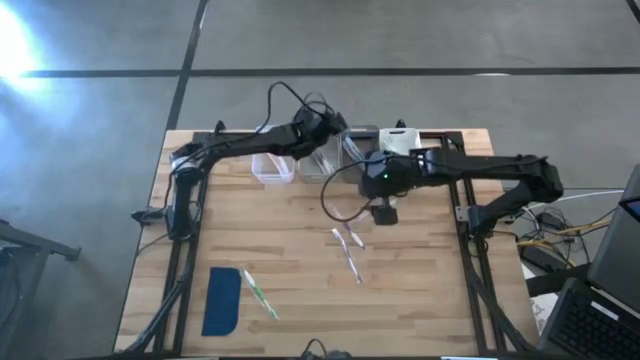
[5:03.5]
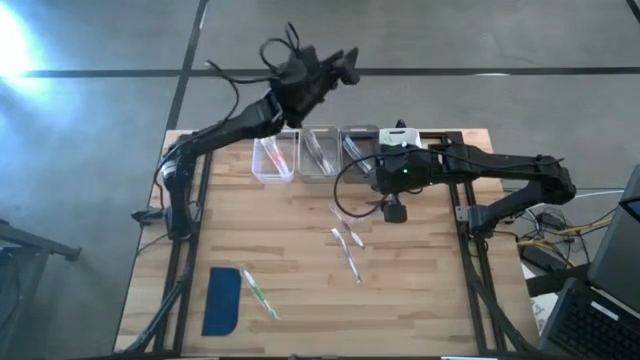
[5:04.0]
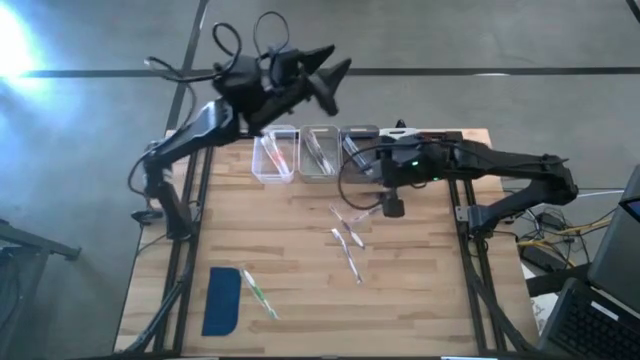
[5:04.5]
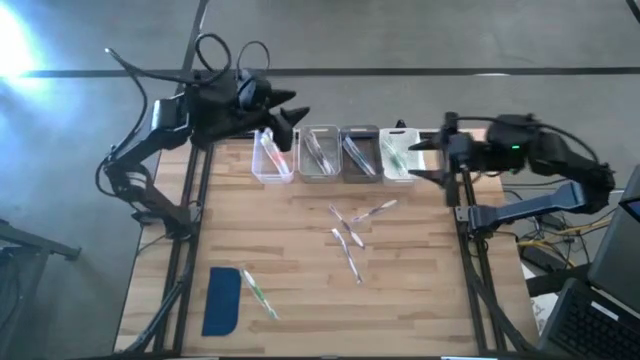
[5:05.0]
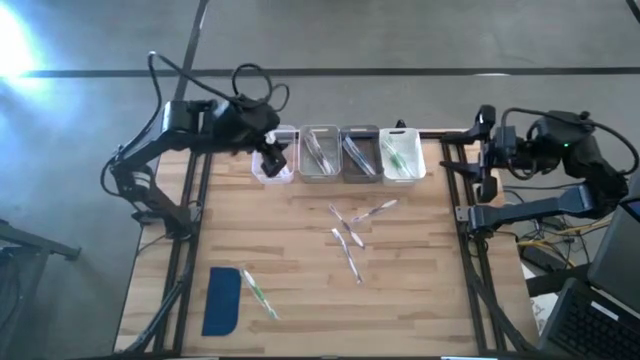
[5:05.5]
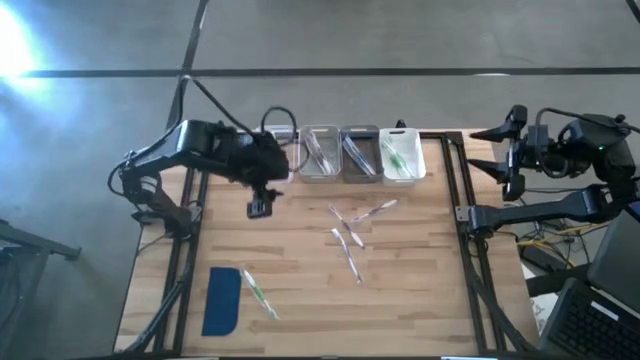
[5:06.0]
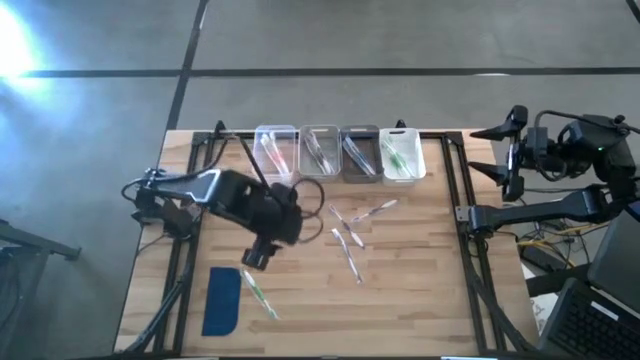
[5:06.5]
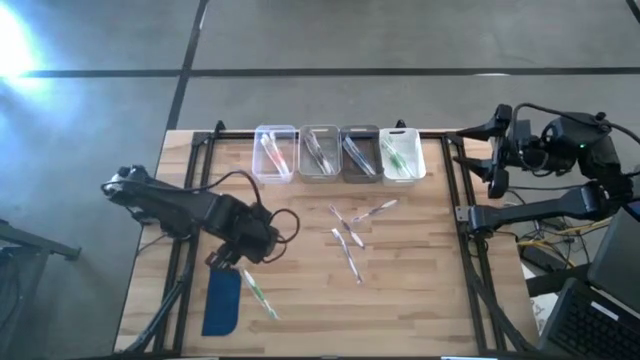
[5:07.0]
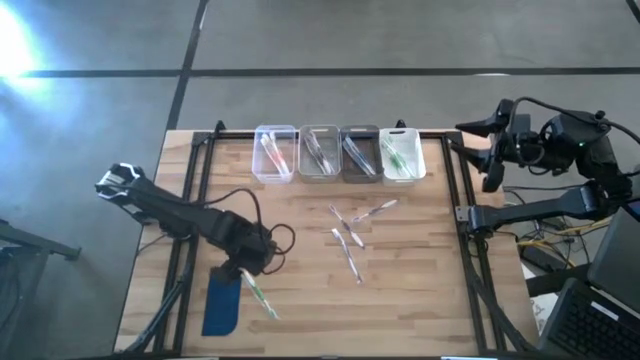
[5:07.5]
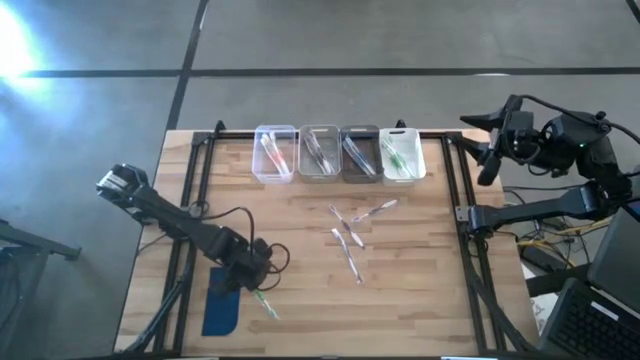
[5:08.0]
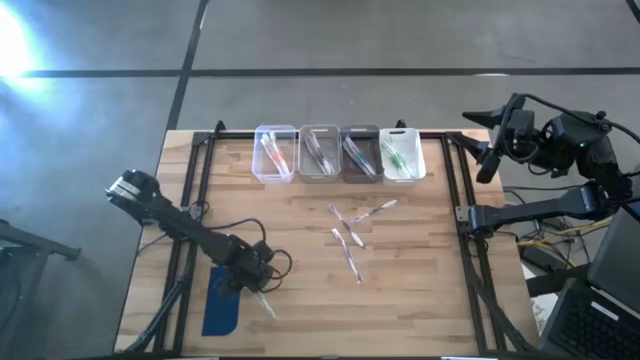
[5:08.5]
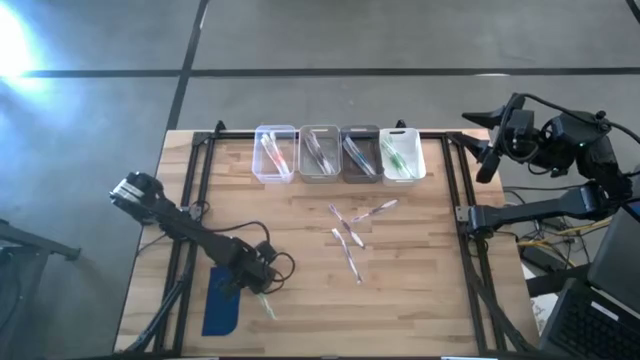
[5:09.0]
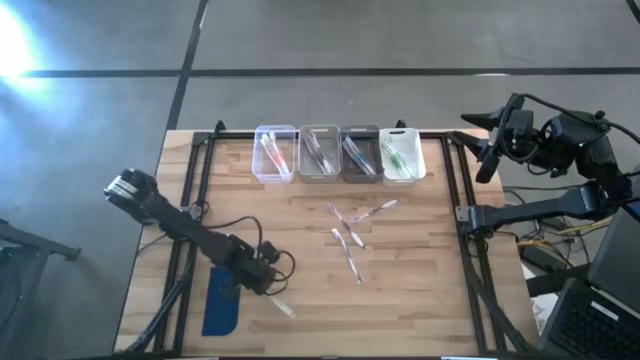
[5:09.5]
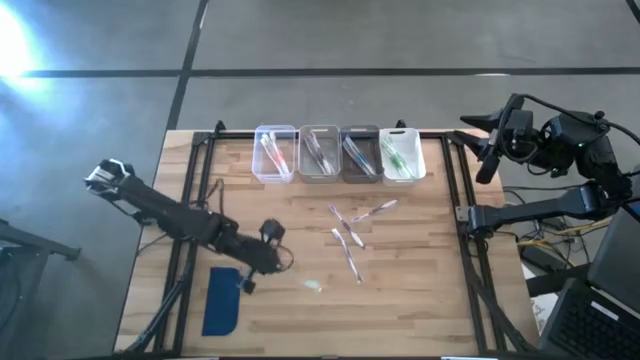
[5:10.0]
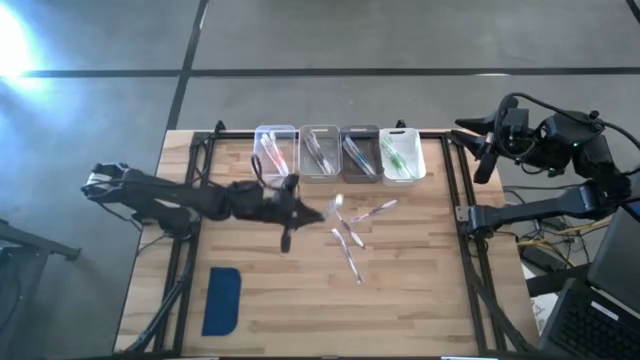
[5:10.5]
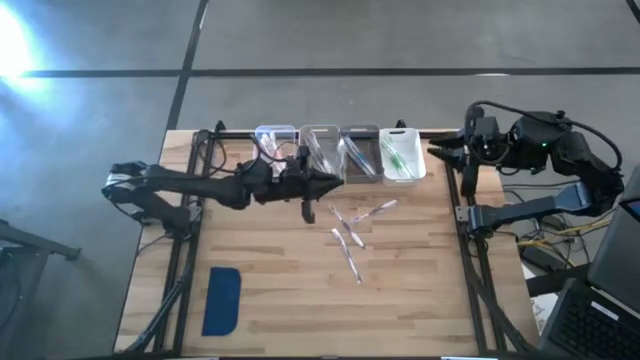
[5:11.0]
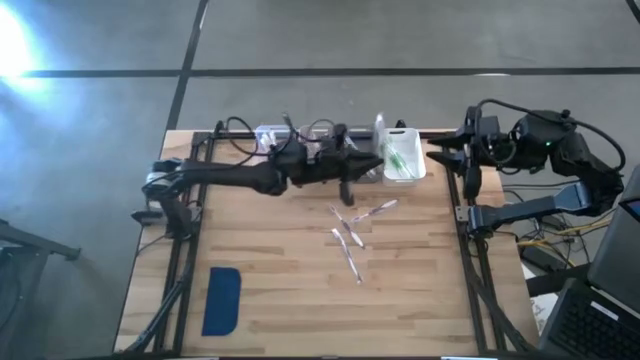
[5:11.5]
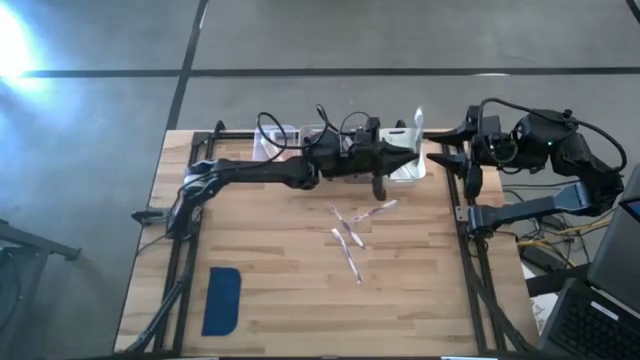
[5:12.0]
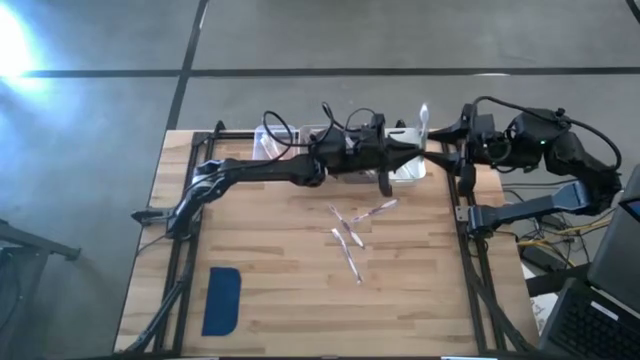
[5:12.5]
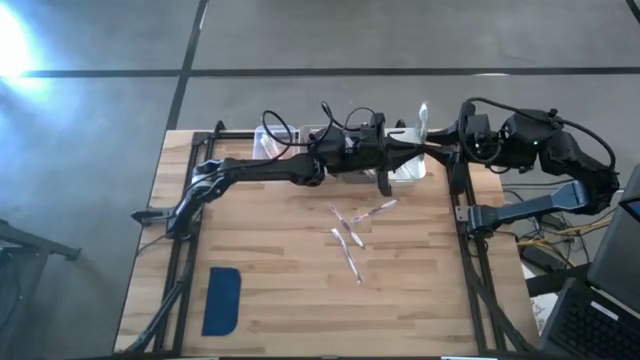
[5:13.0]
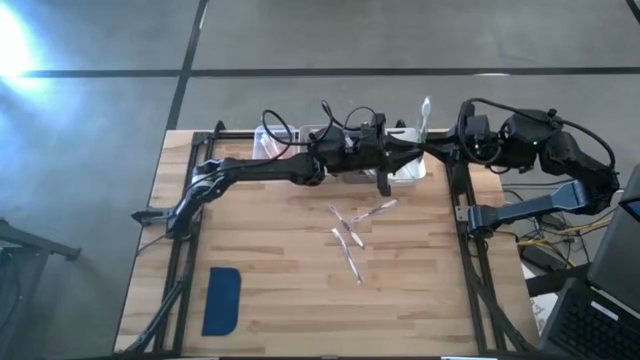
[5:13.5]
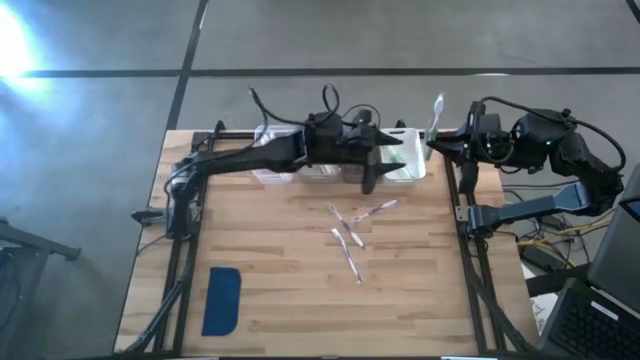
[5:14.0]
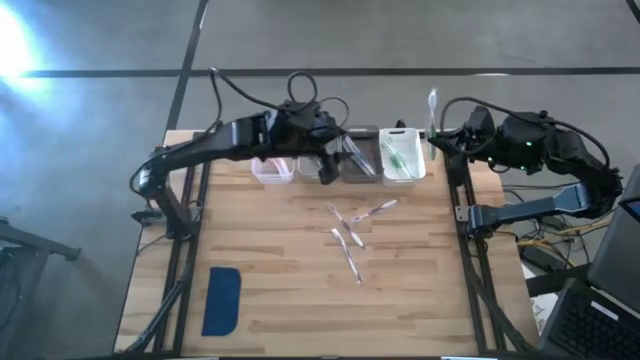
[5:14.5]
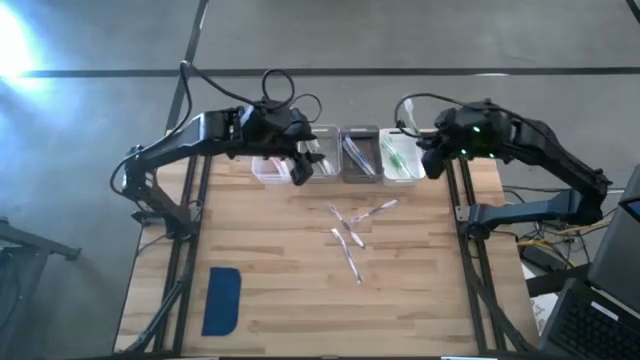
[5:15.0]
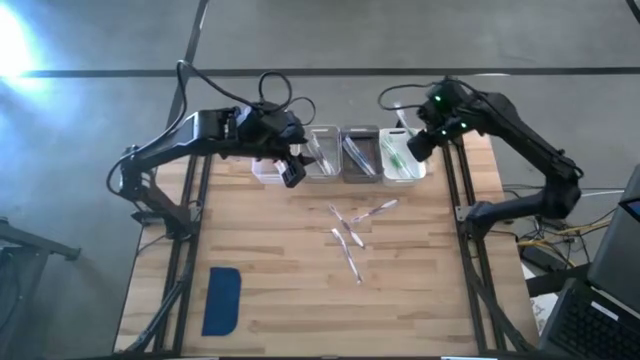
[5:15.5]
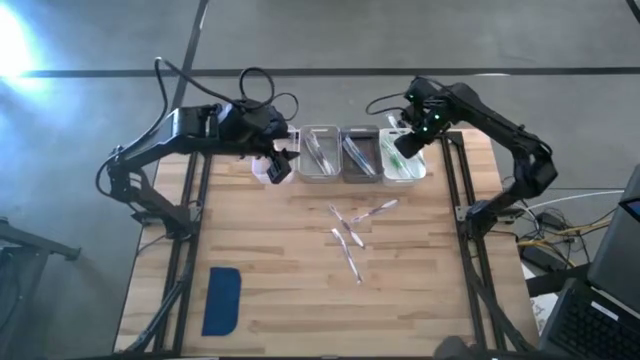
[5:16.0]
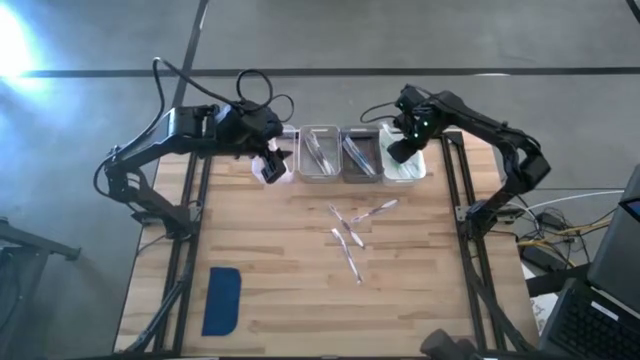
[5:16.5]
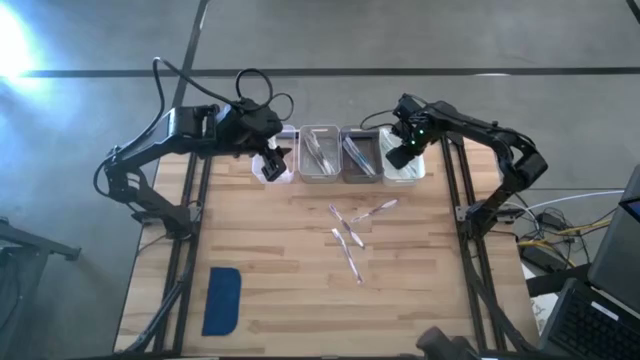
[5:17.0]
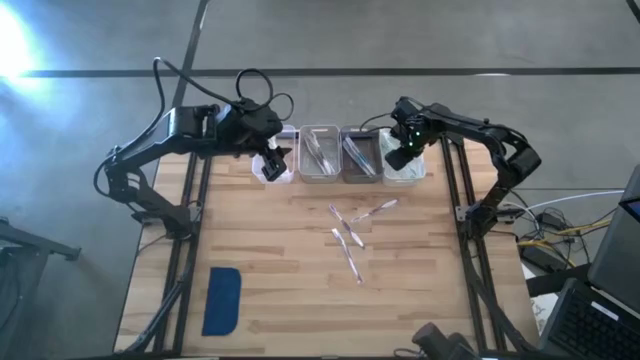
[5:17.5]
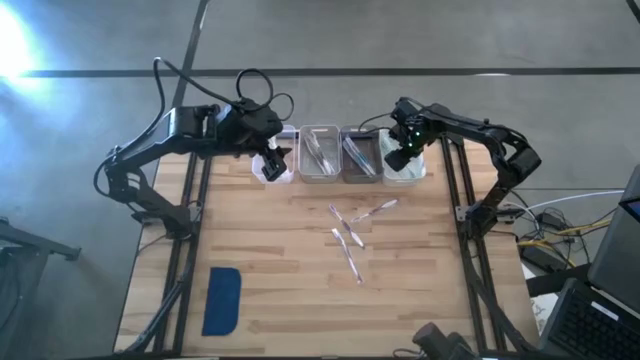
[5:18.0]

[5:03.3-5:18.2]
Task: Pick & Place Toothbrushes
Put the green toothbrush into the white bin

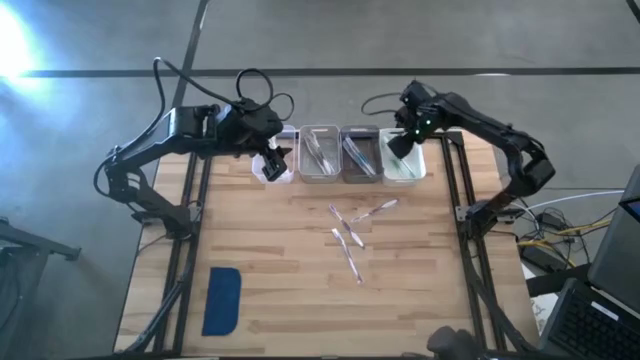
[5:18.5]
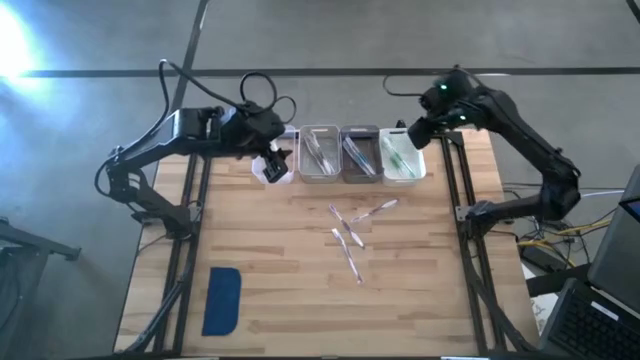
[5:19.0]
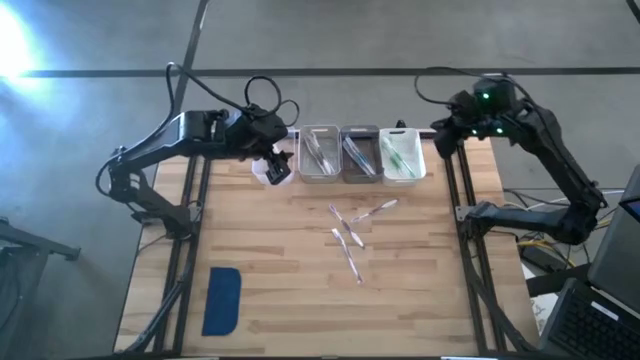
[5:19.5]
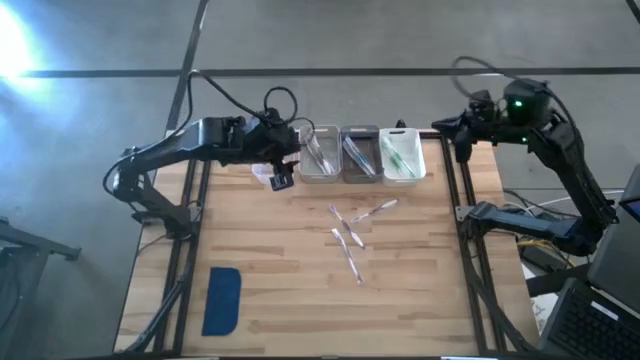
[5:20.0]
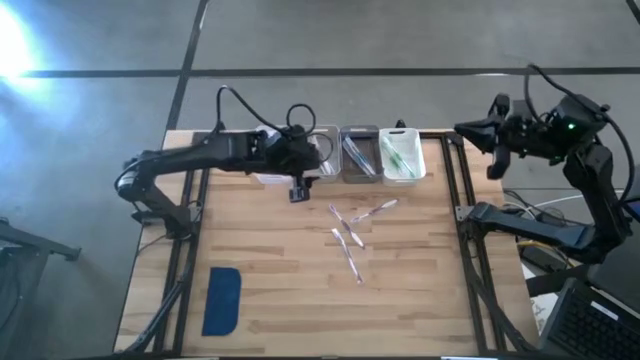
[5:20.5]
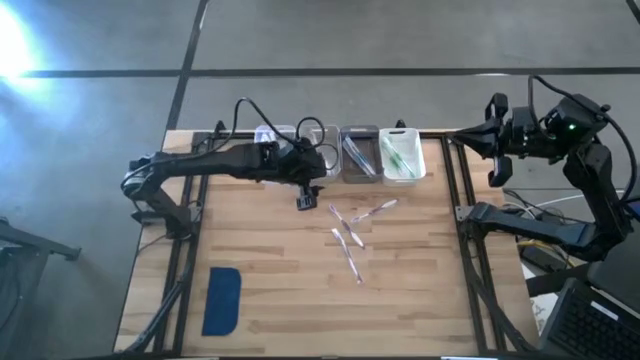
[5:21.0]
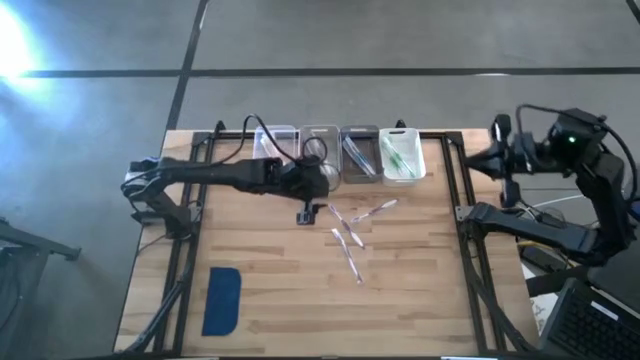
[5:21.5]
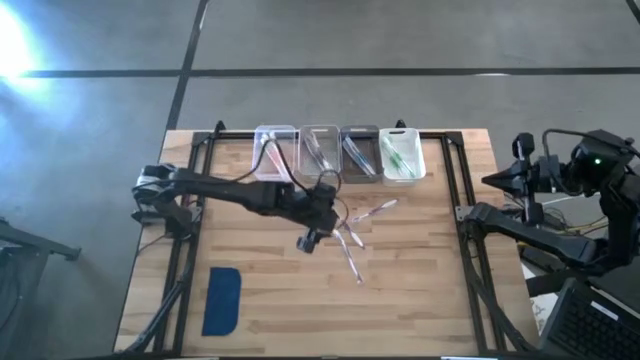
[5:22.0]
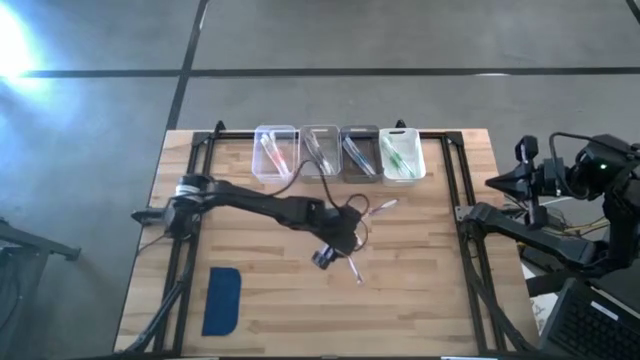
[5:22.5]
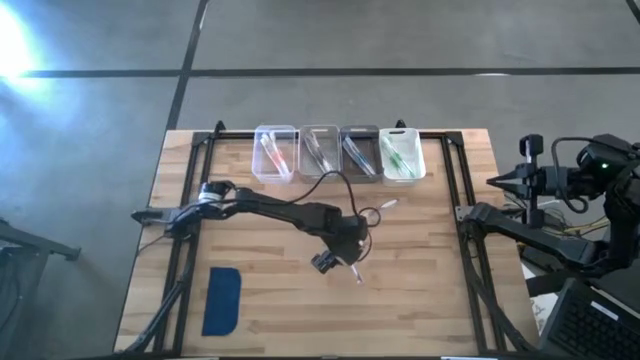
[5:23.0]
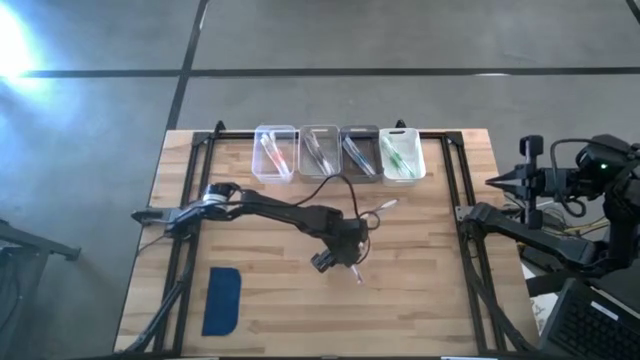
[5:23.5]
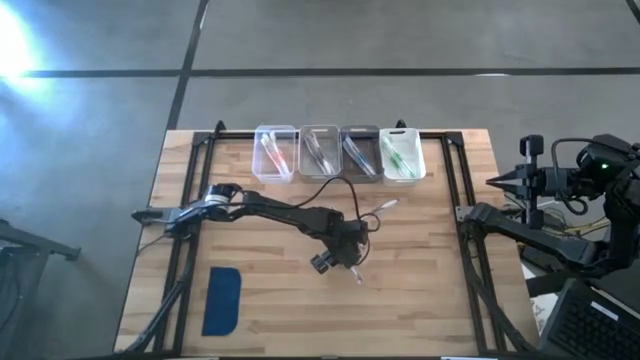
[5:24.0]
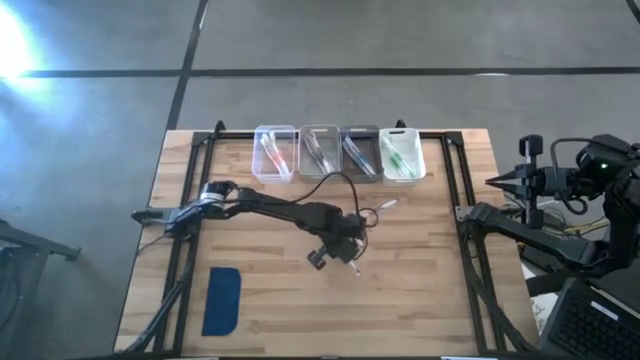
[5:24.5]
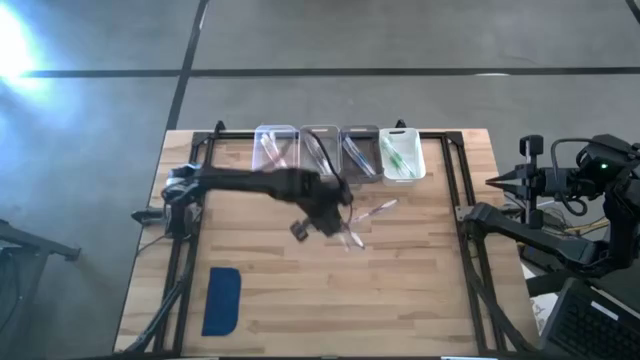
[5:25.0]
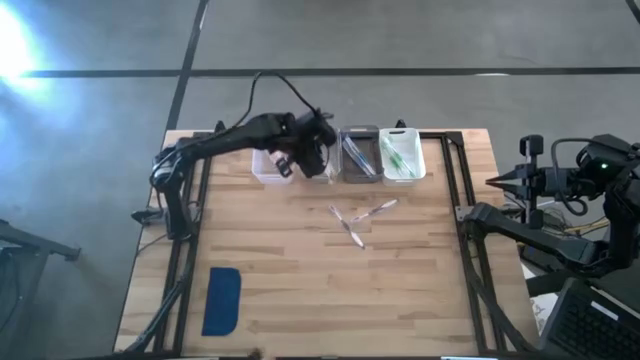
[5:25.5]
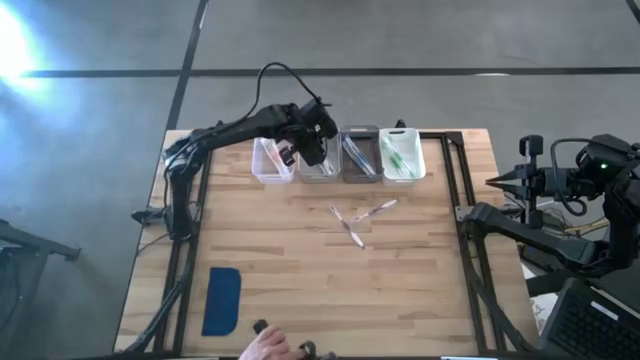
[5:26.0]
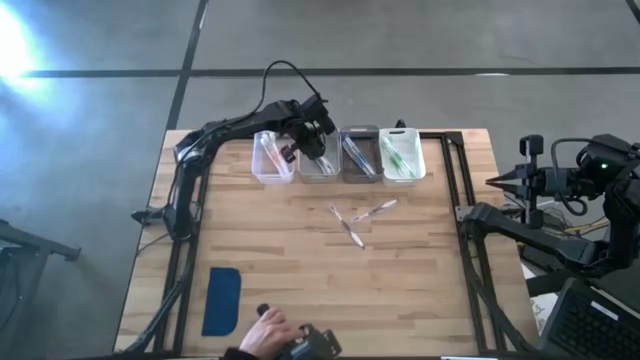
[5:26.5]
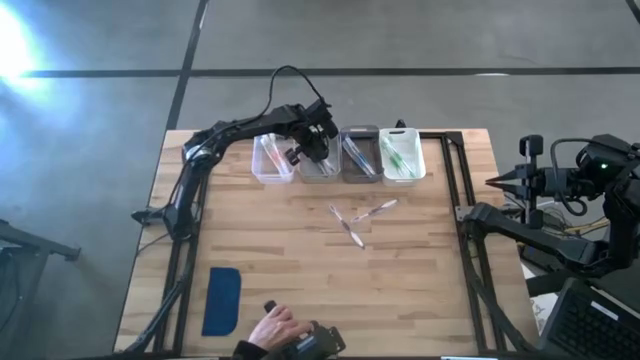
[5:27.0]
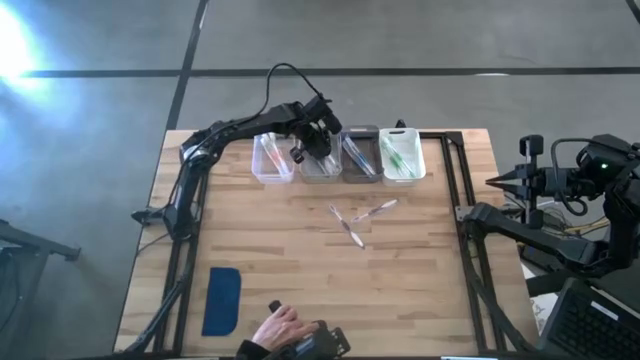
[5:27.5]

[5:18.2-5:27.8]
Put the purple toothbrush into the gray bin
